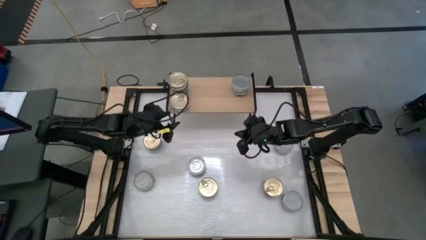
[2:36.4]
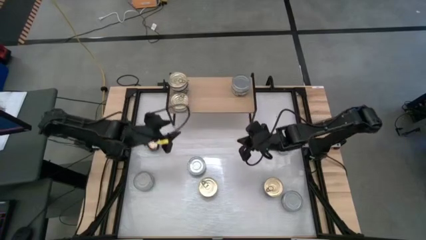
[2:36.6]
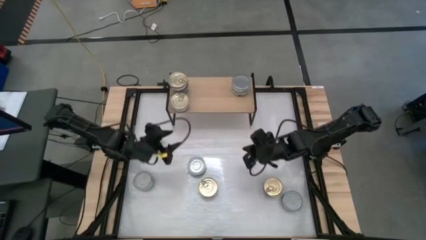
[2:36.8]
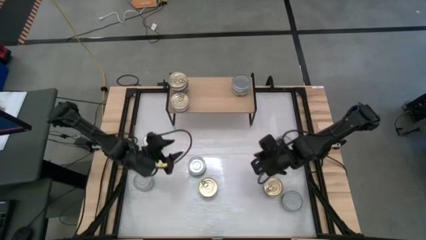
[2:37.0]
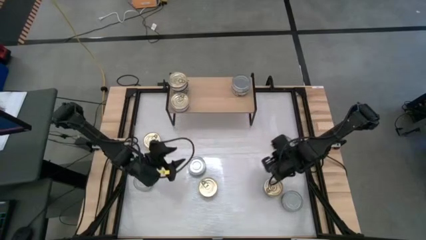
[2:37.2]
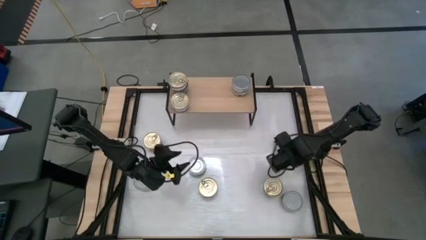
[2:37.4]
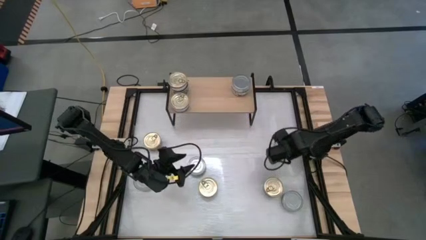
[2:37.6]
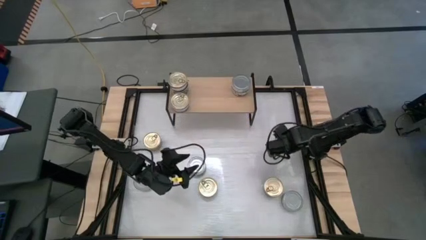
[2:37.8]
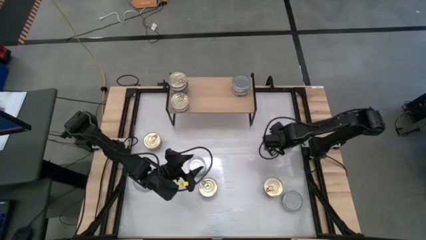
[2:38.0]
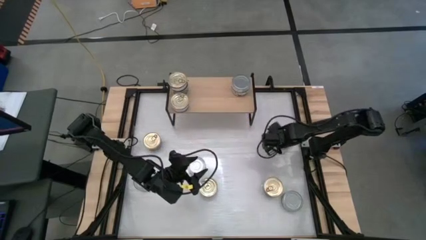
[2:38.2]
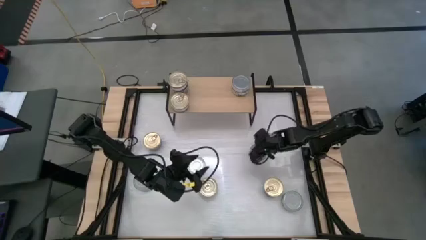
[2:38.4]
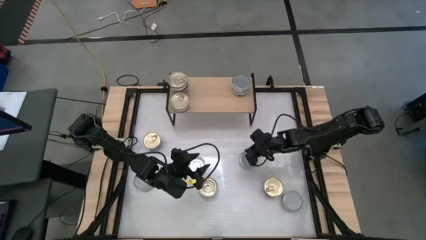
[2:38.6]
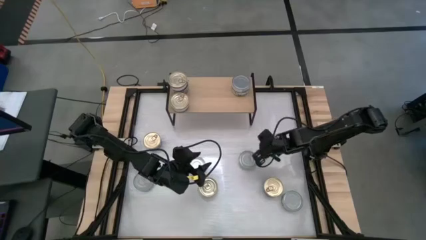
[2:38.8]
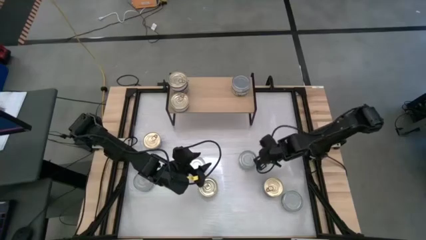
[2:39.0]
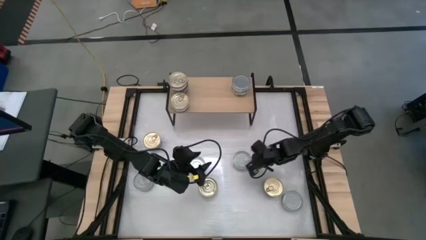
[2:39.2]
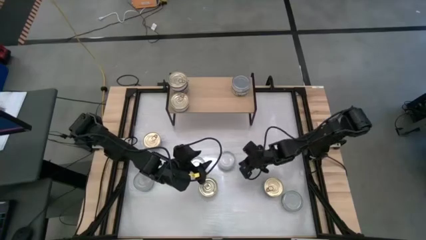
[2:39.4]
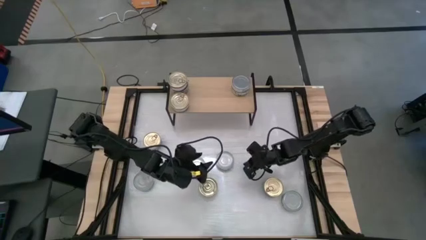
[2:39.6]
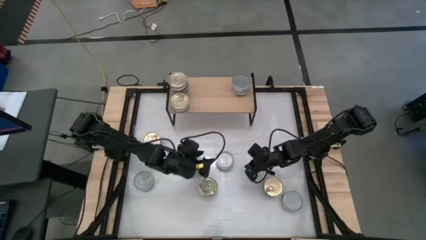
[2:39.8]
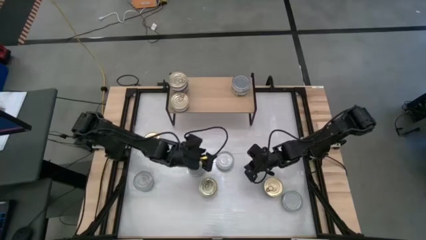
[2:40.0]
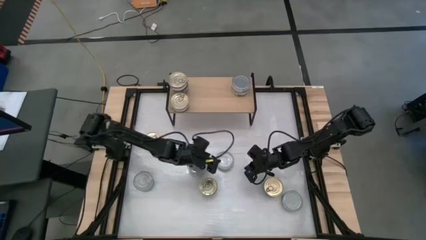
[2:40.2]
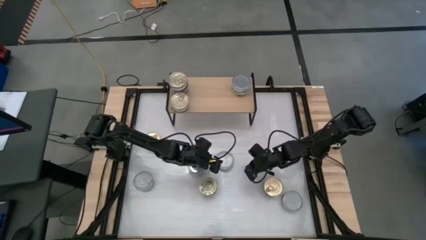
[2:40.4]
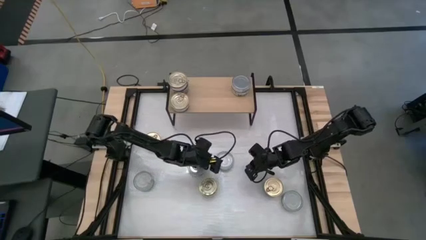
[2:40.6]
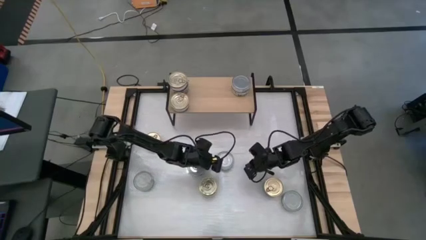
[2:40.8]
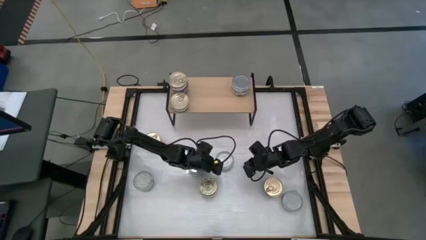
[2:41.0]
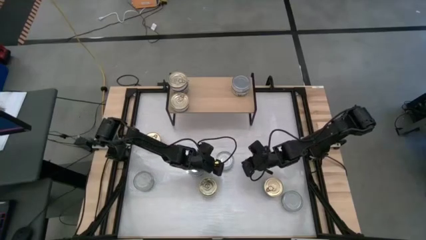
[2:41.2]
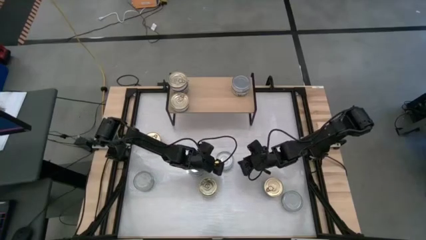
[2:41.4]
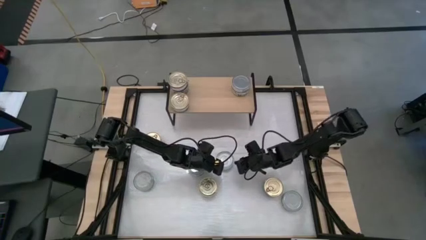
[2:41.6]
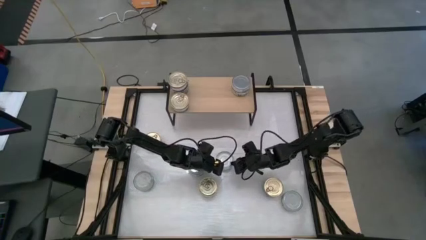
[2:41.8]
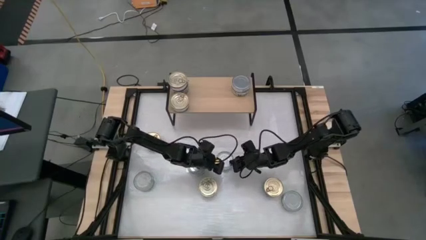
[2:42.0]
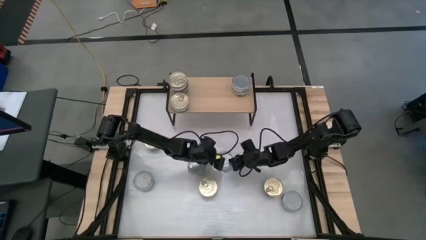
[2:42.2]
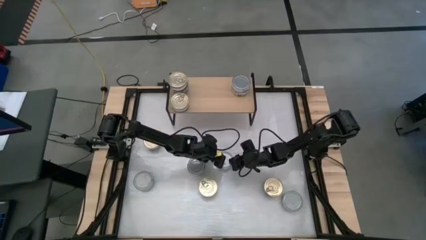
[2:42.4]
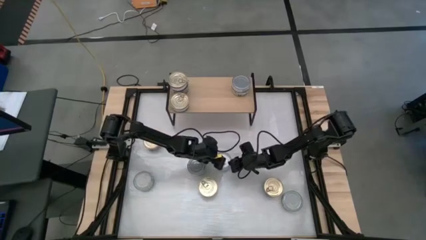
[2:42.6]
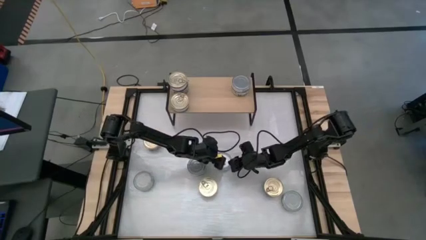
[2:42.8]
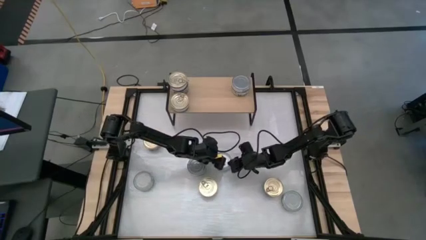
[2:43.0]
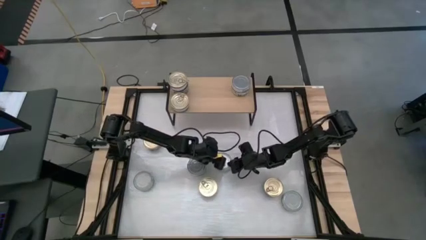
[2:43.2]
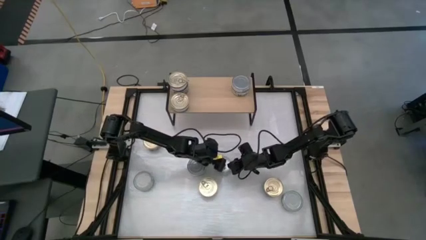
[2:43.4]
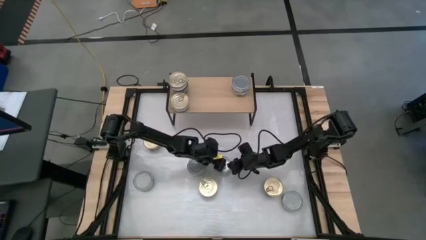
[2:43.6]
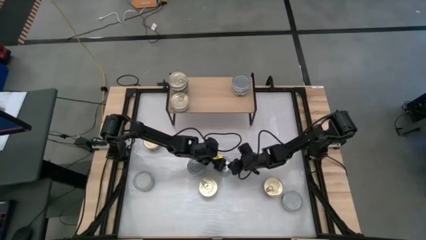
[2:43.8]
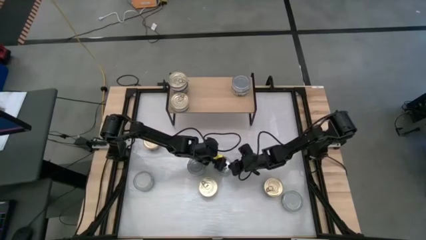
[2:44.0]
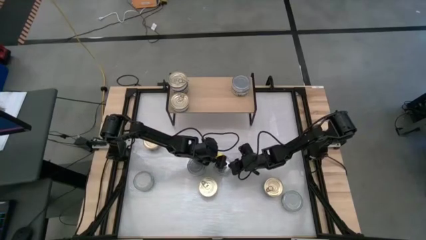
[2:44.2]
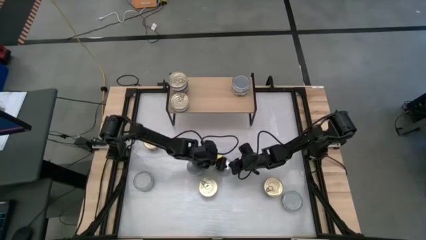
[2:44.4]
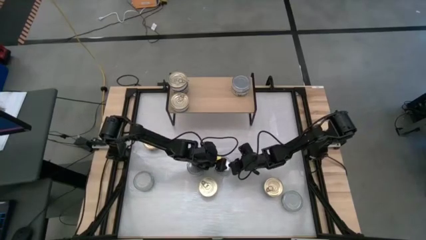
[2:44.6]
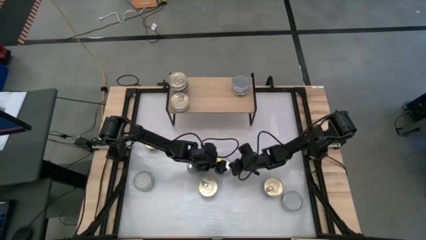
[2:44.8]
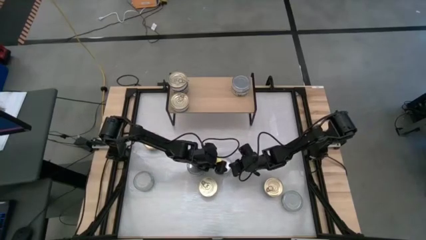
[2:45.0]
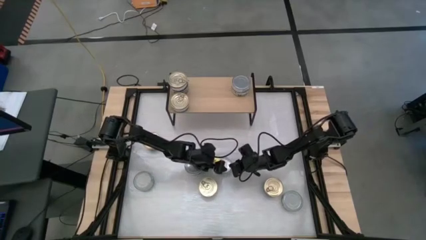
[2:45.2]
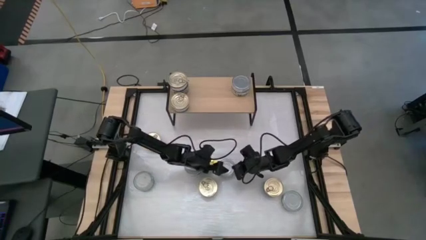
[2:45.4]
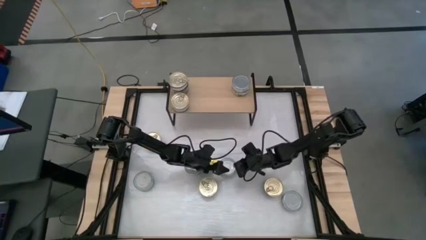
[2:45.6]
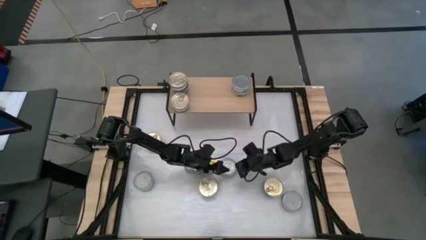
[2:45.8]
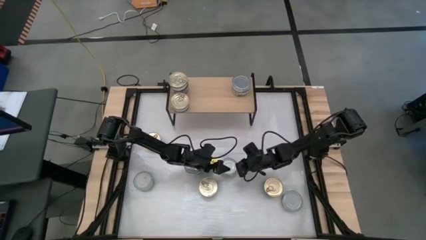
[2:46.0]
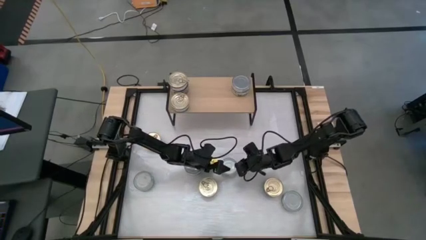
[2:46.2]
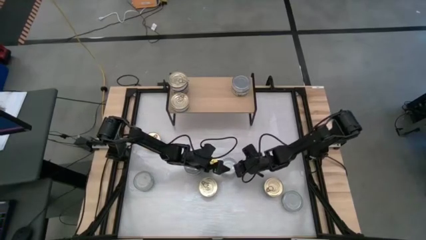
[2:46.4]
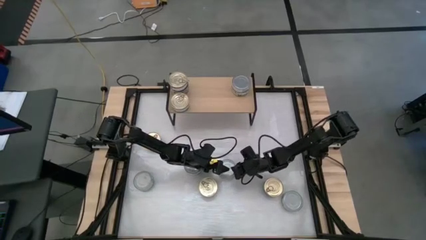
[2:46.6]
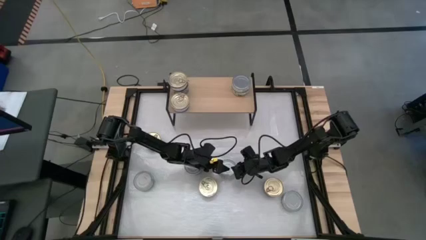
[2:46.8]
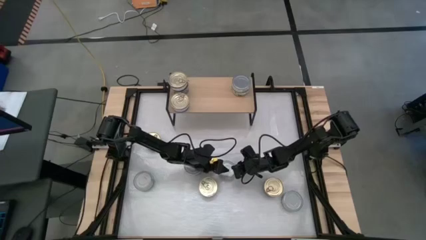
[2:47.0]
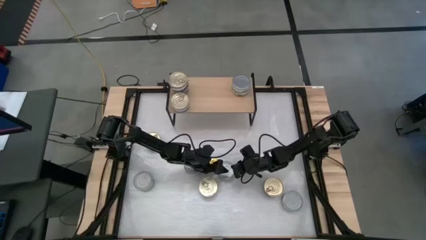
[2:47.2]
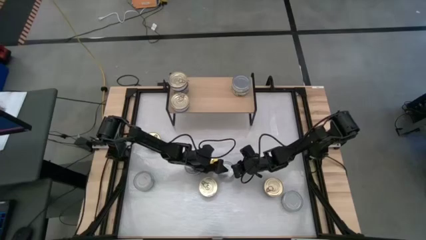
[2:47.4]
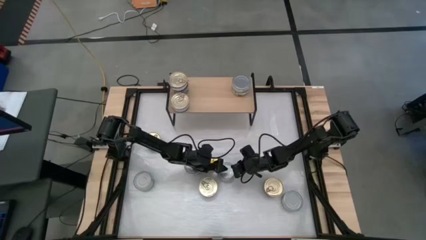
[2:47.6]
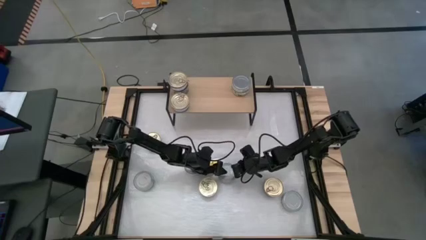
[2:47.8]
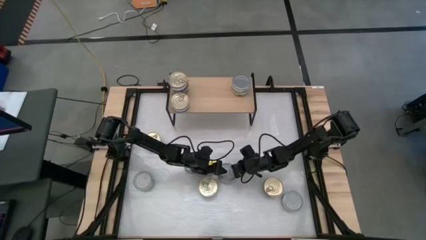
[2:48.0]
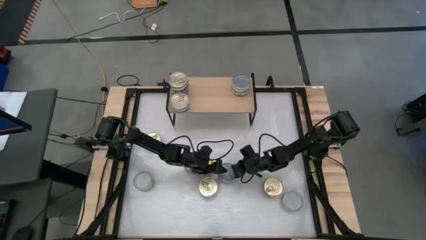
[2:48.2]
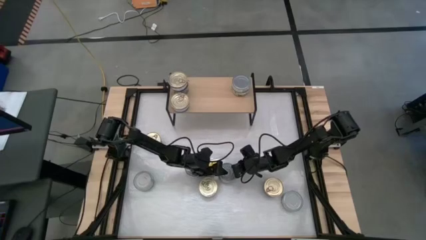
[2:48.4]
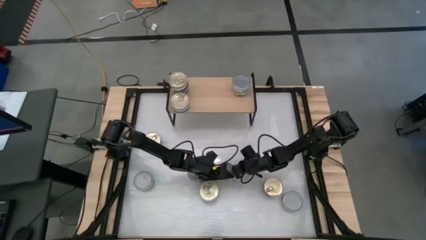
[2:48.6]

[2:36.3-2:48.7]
Task: Stack canned seafood by type on shelf
Put the green white tuna can on the shelf aligned with the stacked green white tuna cans

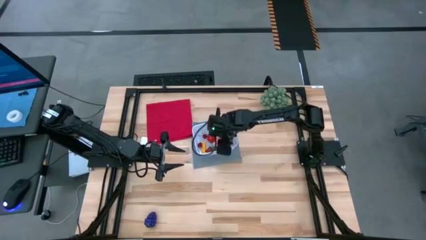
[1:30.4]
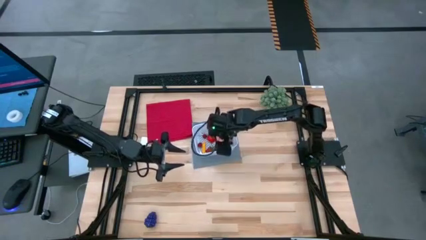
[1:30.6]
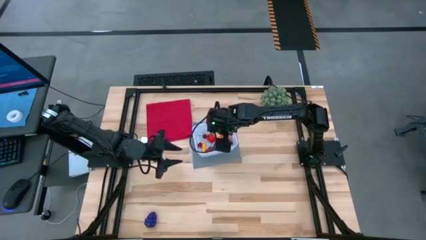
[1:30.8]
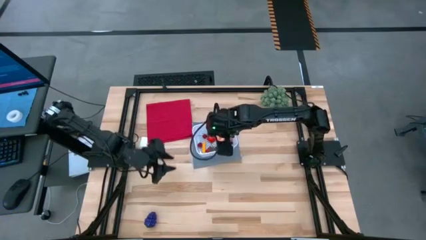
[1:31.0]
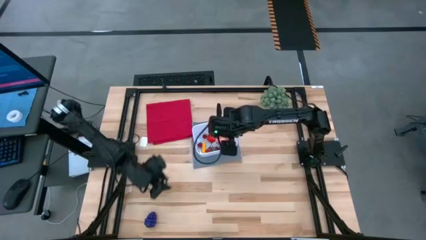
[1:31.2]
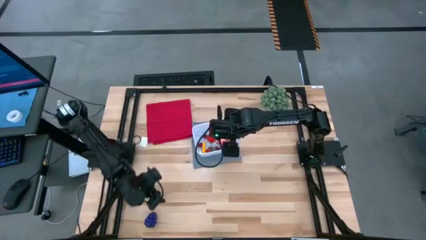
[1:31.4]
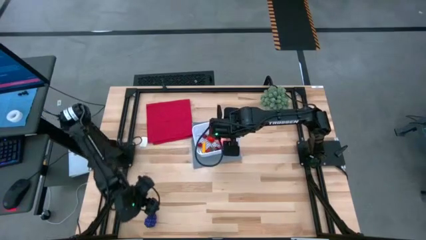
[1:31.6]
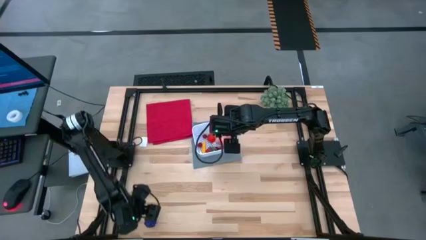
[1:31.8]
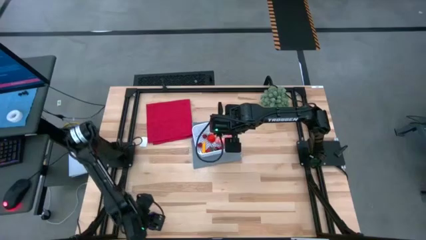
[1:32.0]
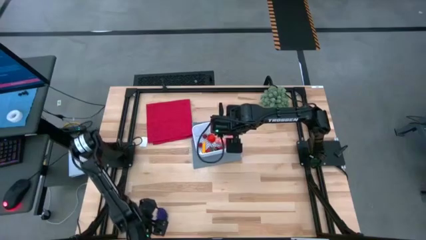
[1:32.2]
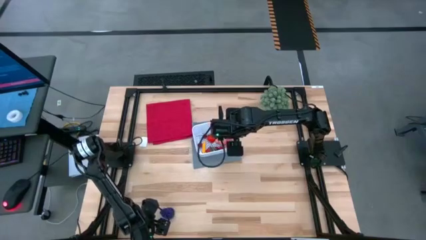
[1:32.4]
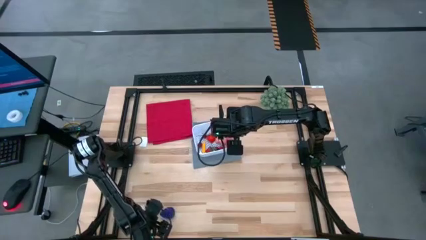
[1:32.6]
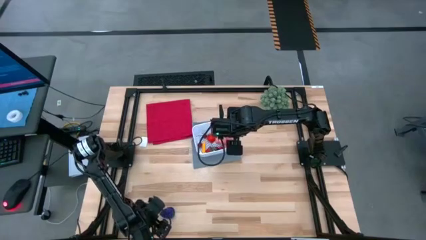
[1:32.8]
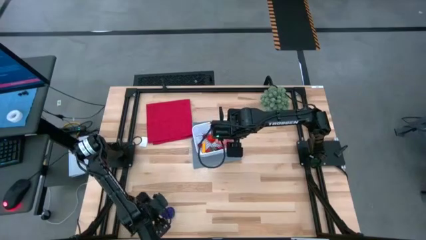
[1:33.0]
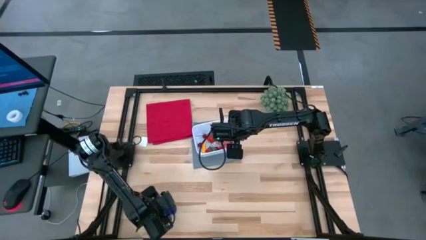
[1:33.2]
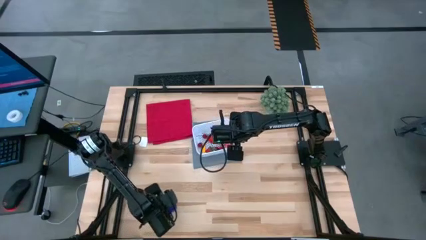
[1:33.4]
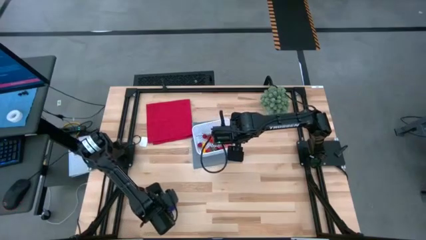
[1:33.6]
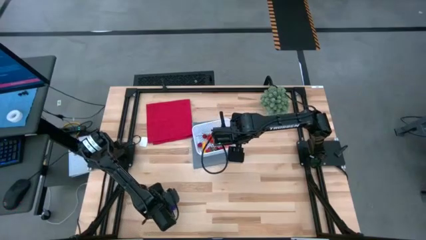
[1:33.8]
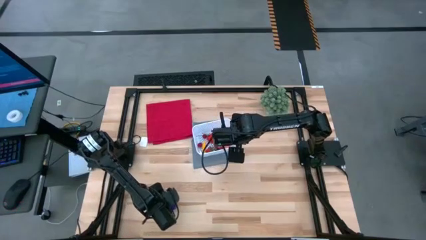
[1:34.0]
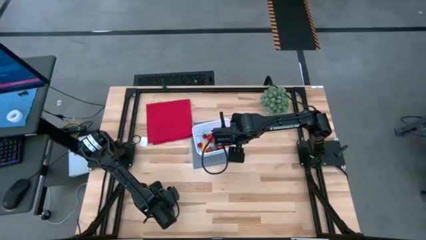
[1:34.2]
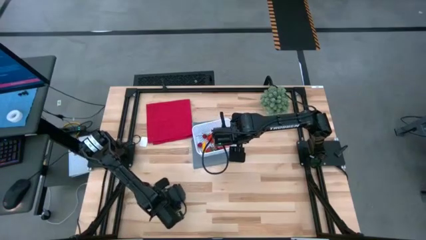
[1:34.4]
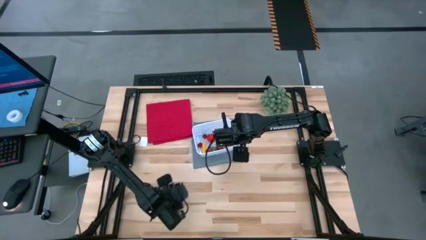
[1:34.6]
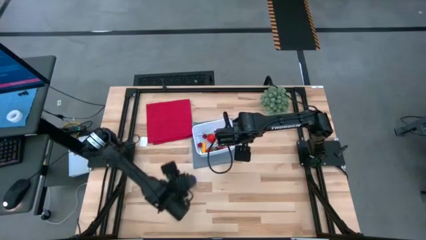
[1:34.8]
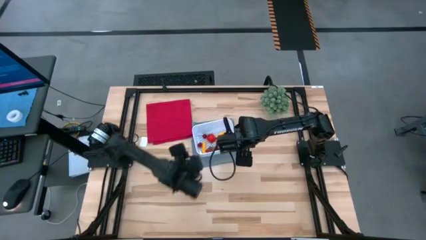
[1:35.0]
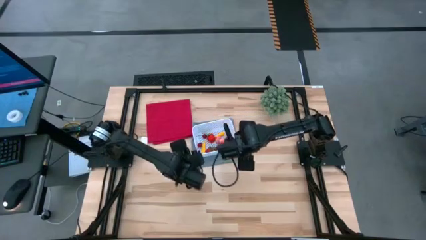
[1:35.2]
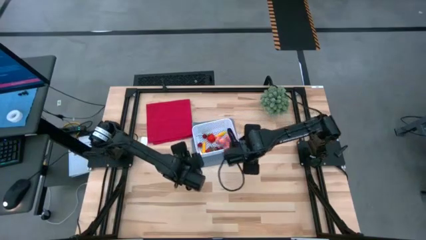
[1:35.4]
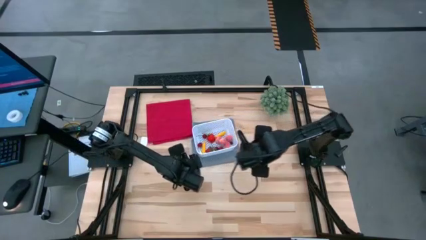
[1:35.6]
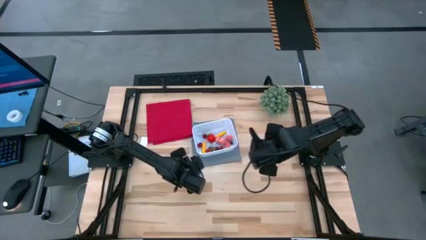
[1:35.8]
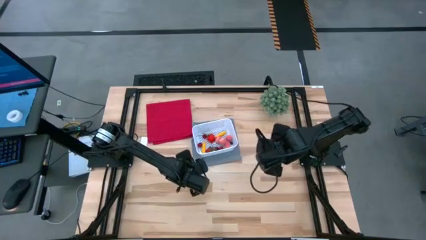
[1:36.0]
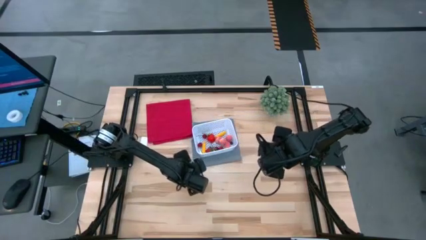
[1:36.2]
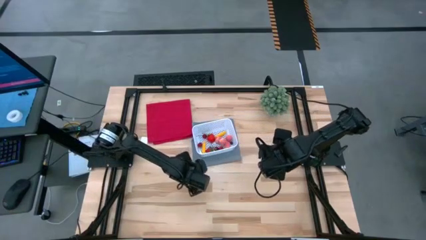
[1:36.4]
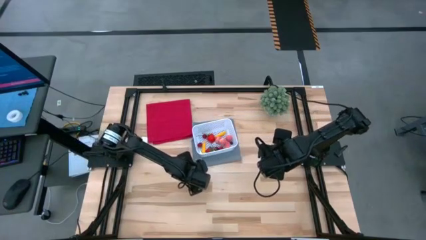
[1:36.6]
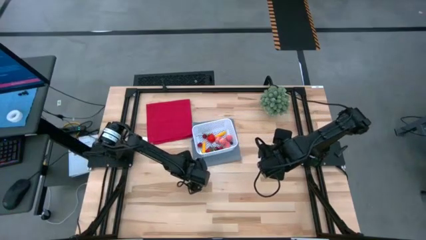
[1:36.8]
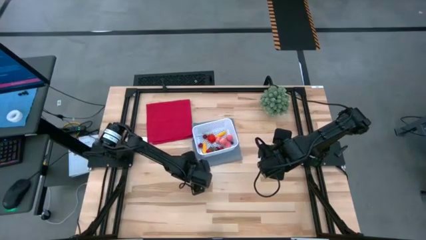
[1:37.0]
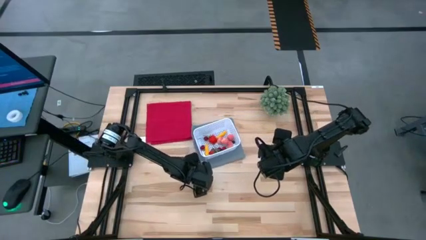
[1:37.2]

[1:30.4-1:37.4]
Task: Pick and placing Produce into tupperware
Put the grape into the white basket
